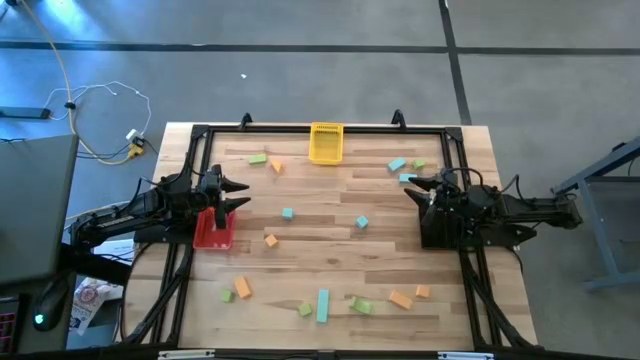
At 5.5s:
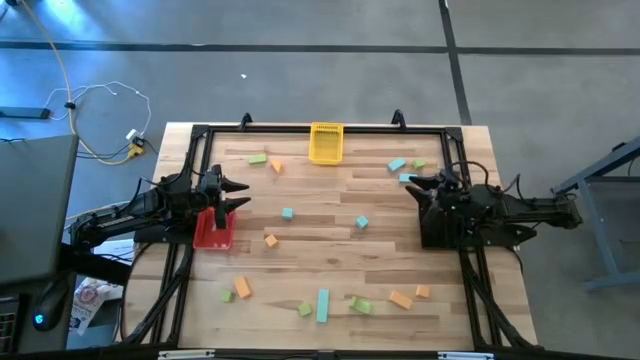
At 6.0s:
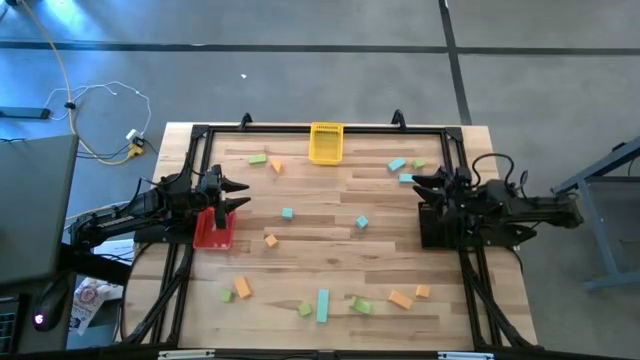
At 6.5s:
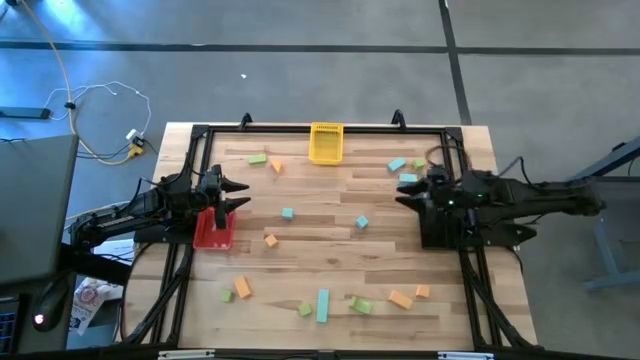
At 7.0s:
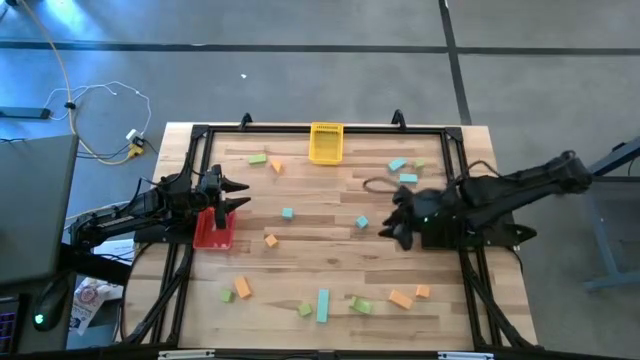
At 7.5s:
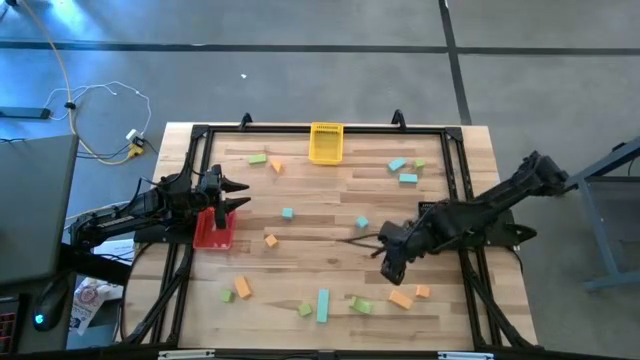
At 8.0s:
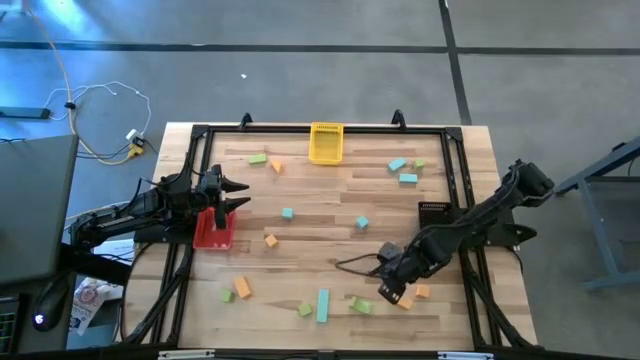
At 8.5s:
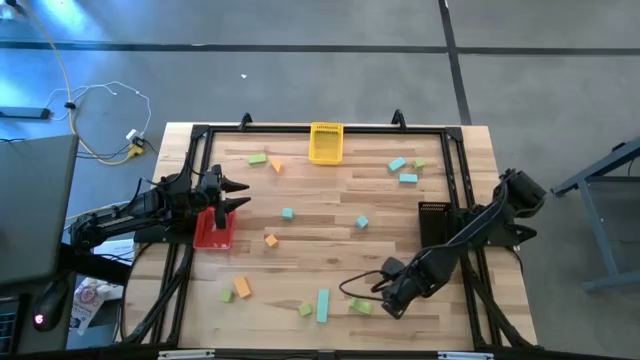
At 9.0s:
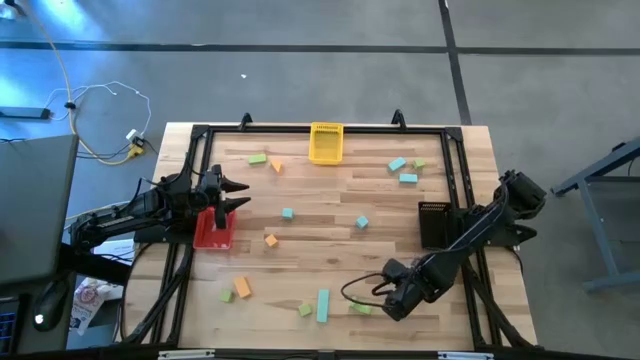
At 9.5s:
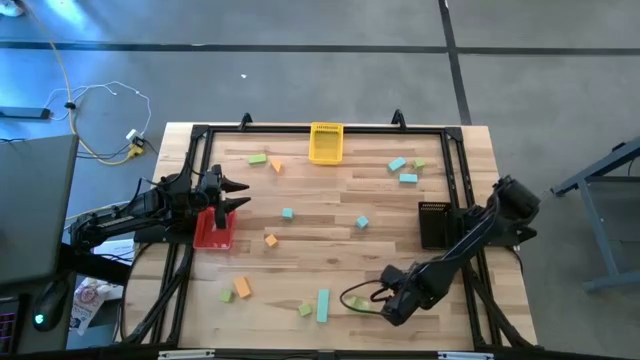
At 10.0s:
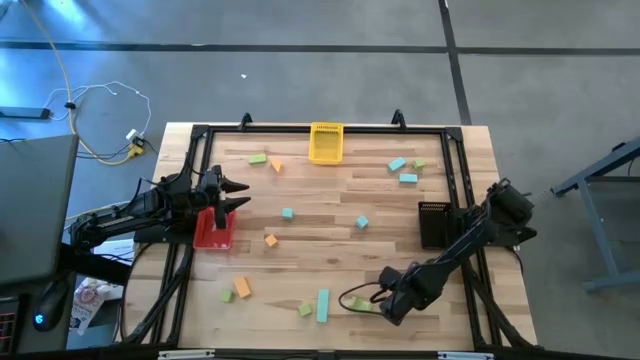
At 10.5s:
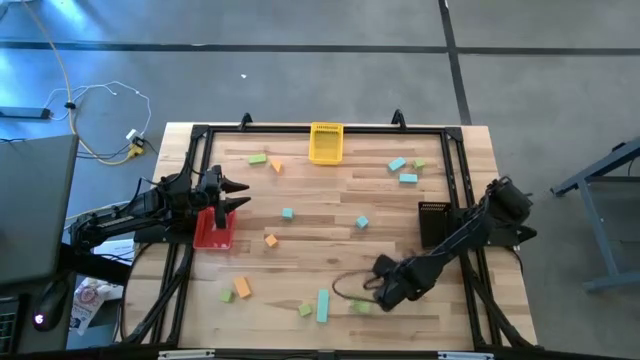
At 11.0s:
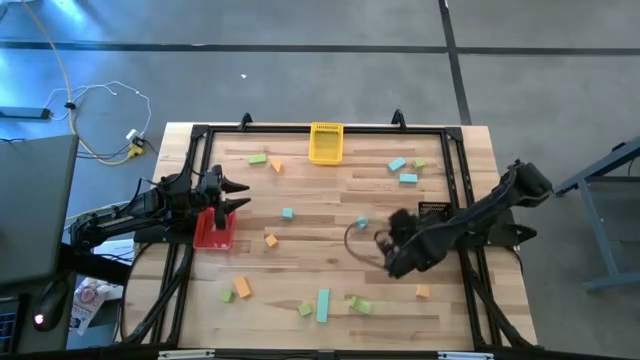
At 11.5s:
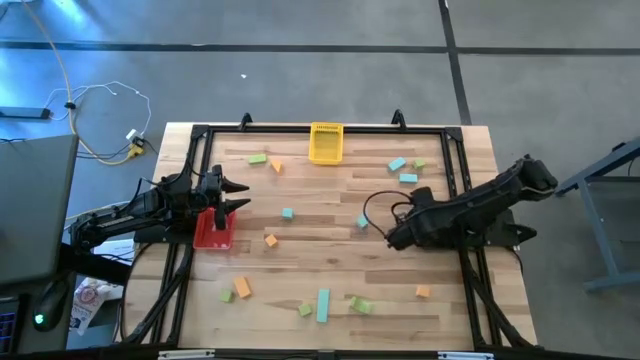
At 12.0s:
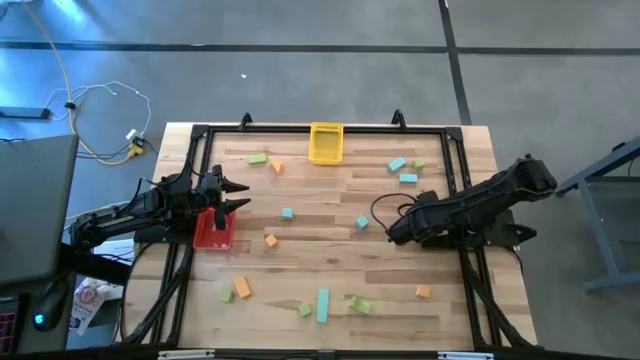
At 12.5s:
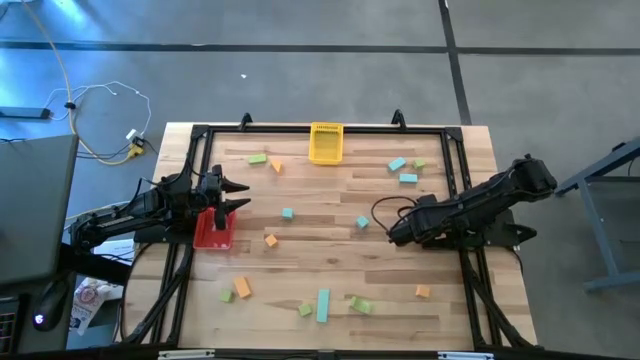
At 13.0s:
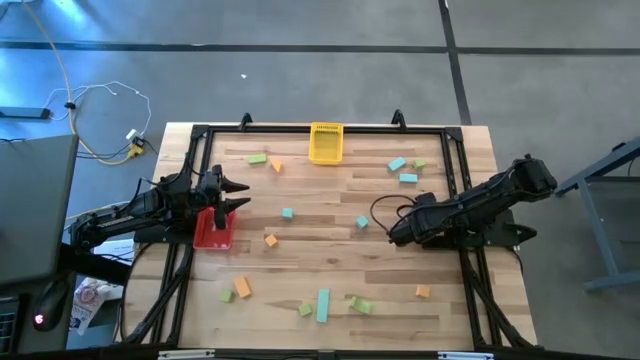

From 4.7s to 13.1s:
Task: Sort & place blocks by color
Put the orange block into the black bin

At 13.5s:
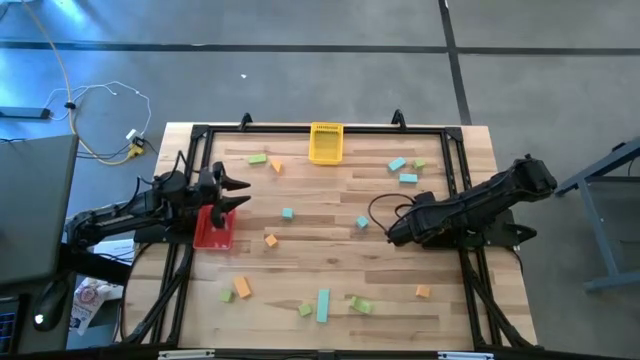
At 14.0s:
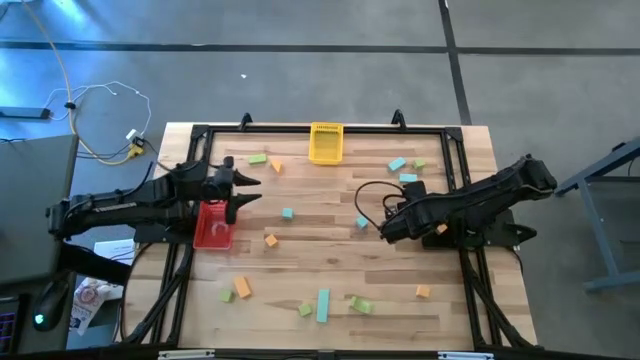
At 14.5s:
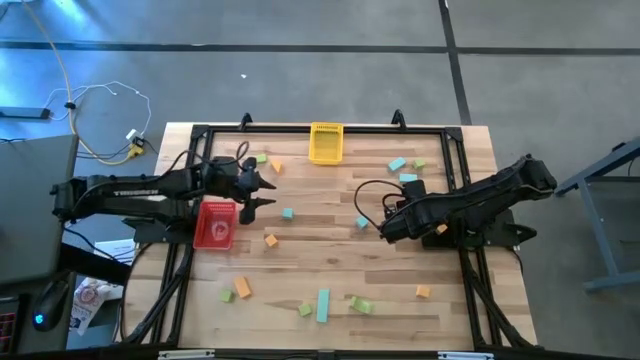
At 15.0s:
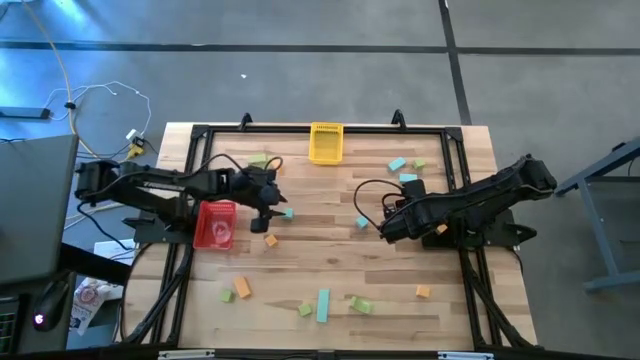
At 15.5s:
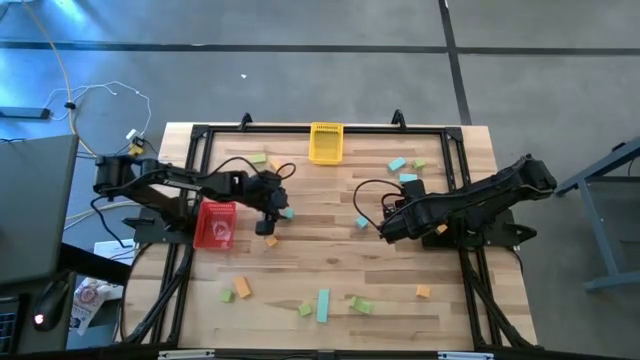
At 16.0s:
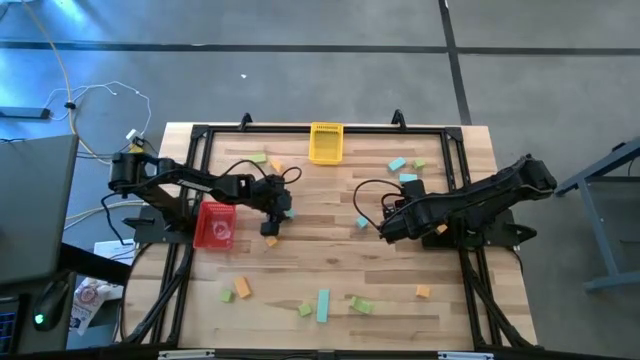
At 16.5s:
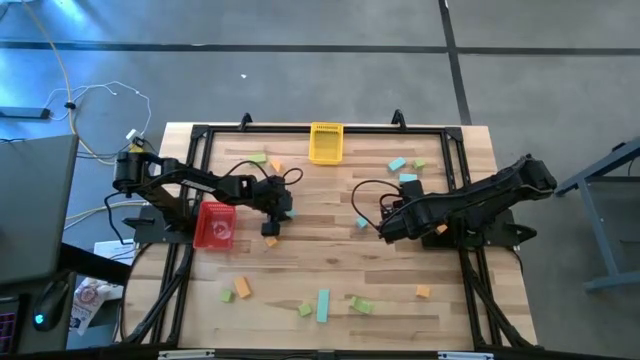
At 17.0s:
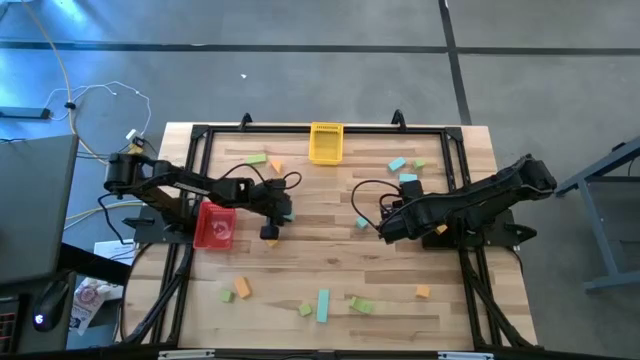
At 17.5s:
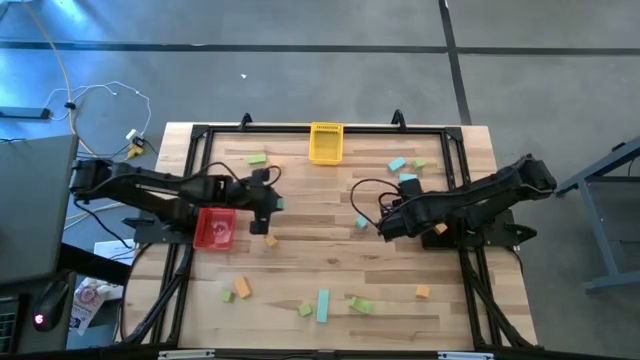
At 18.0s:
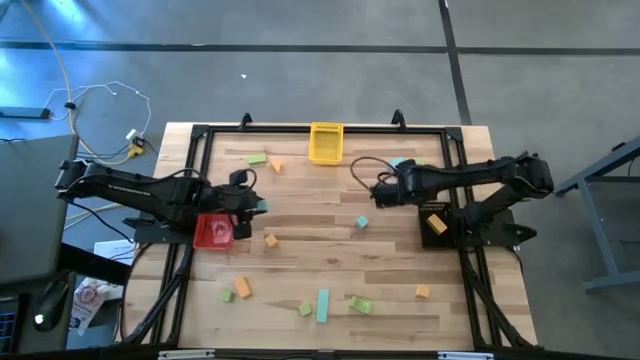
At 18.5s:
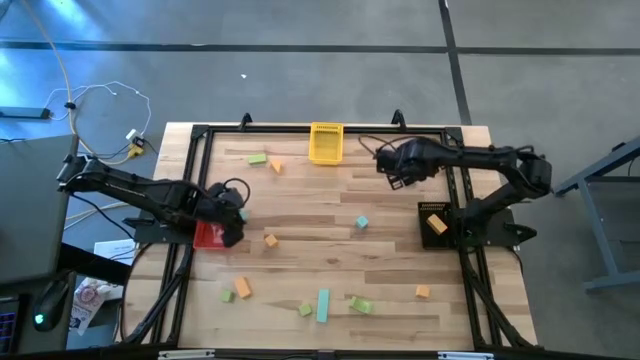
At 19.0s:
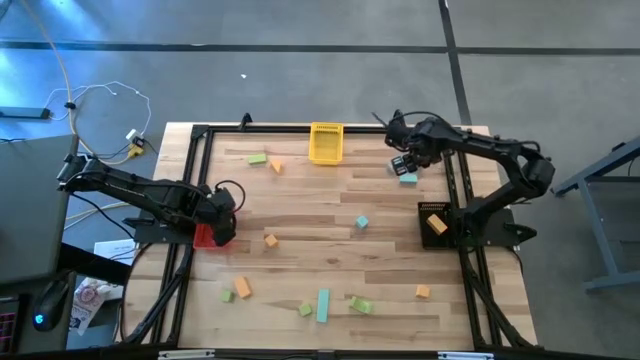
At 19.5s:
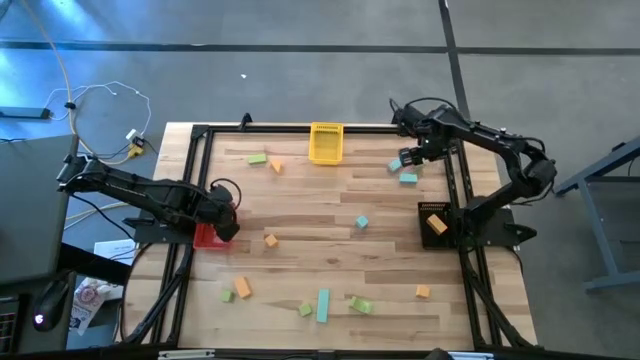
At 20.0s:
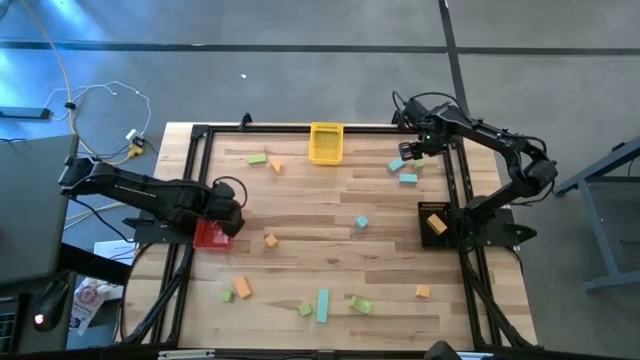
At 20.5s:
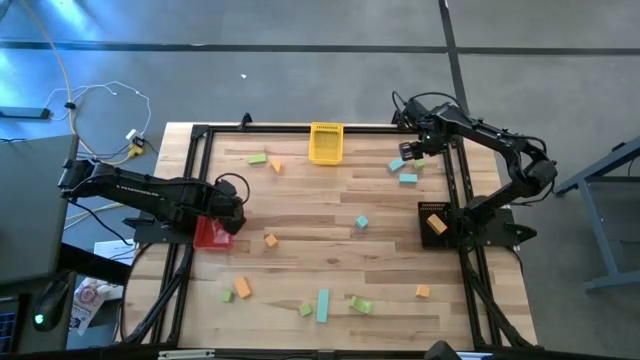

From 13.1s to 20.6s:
Put the blue block into the red bin

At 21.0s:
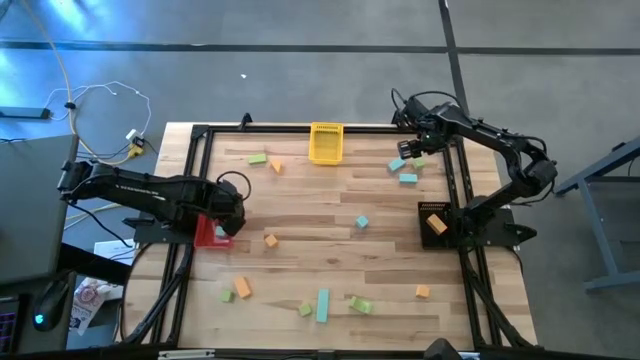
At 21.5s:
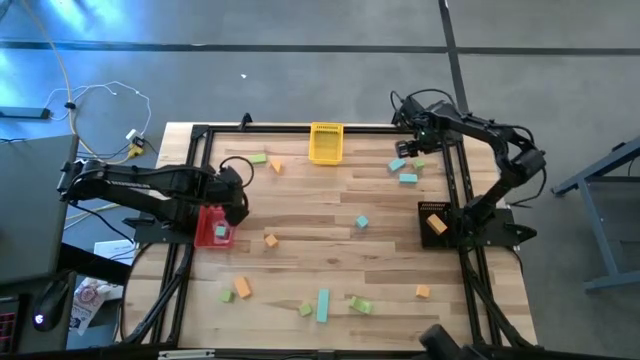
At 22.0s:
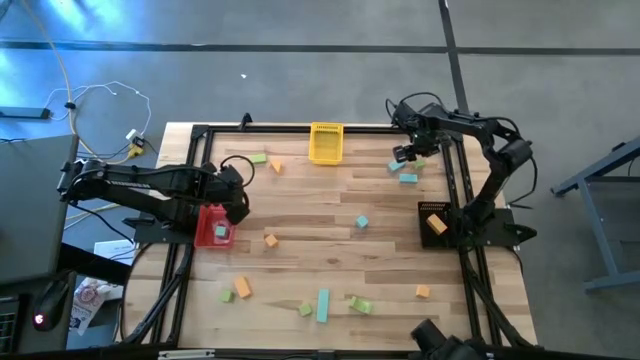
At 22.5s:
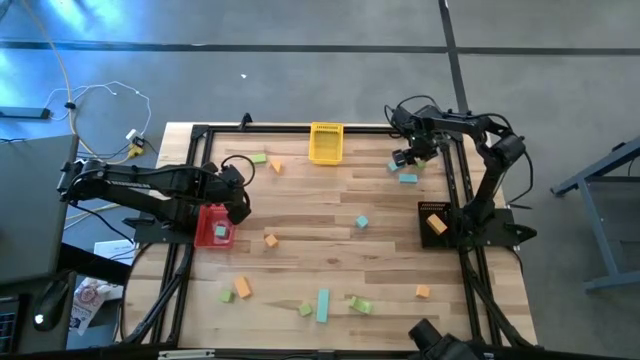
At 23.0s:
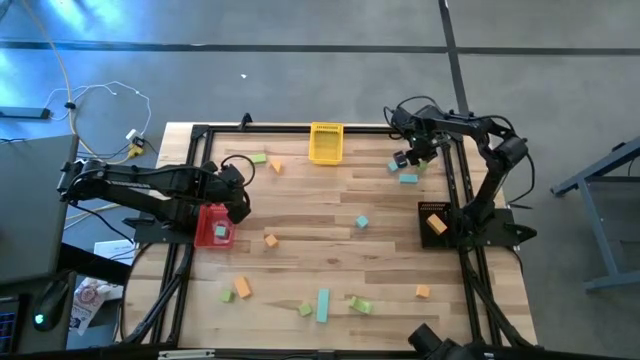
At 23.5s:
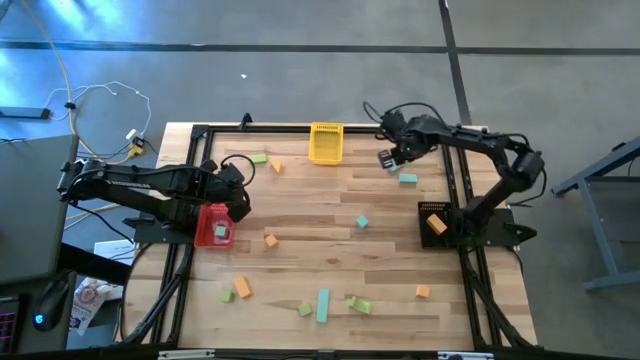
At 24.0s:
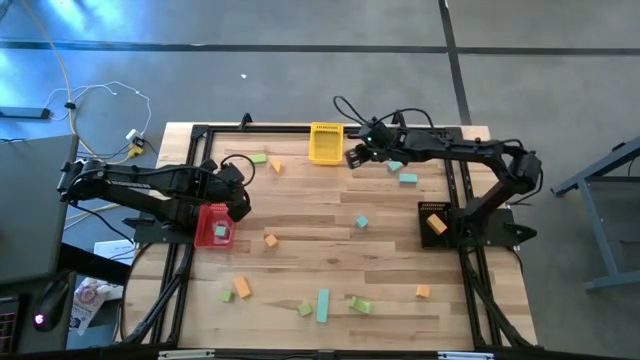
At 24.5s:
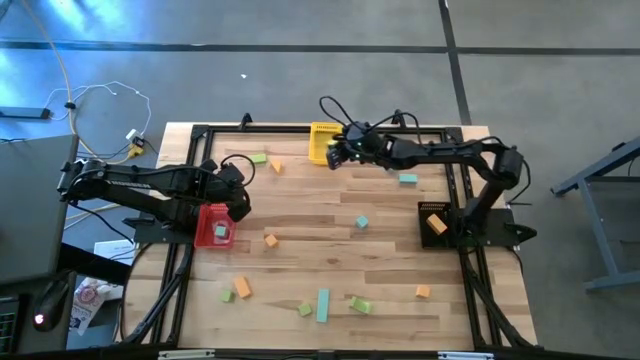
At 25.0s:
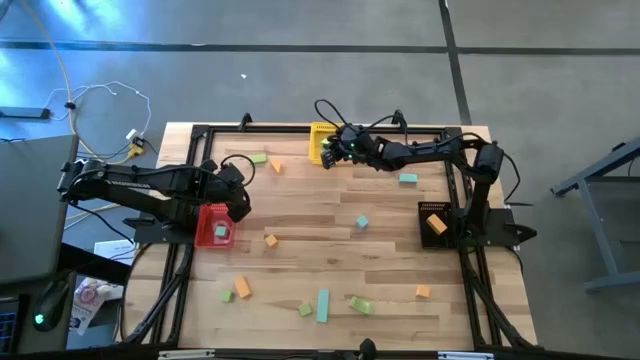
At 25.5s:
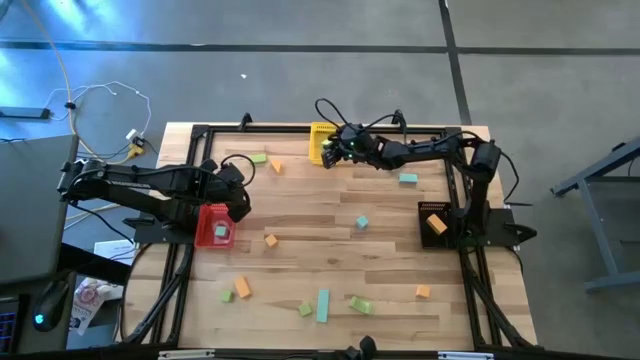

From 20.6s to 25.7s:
Put the green block into the yellow bin

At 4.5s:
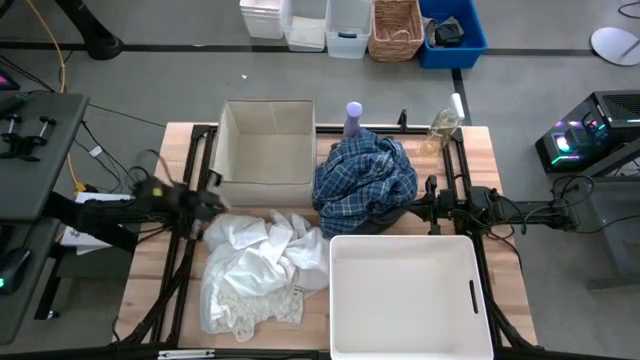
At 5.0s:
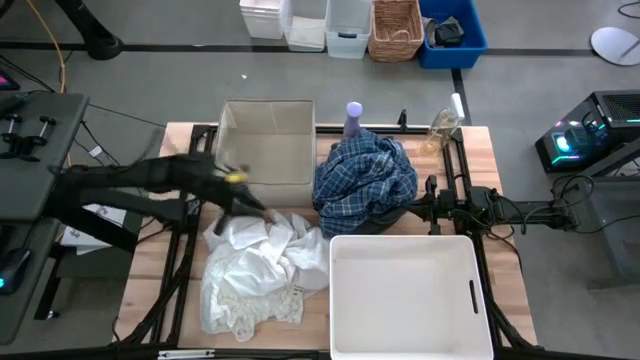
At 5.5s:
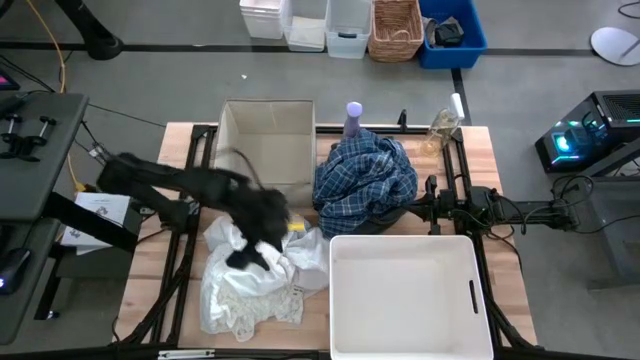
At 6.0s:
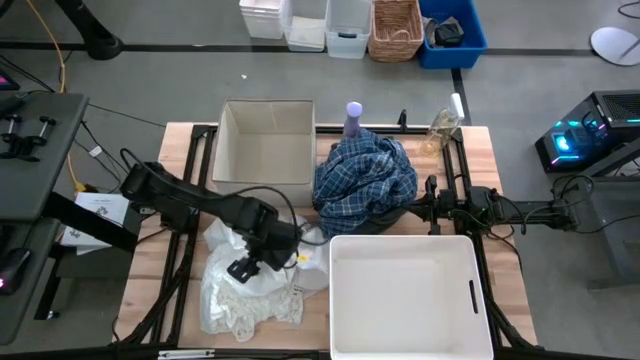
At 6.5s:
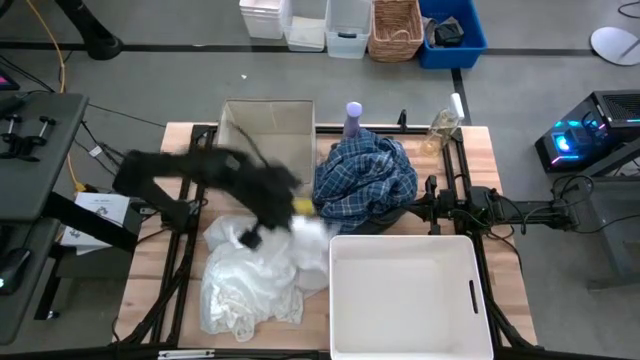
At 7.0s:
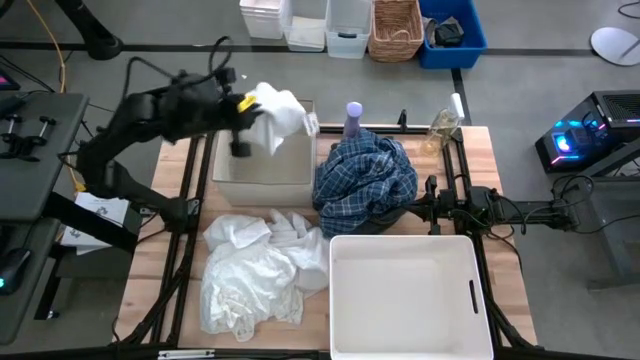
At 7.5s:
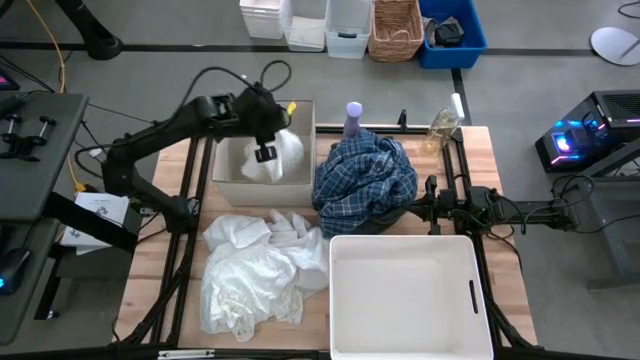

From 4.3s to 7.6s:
Task: Sort clothes
Put the white cloth into the gray bin
